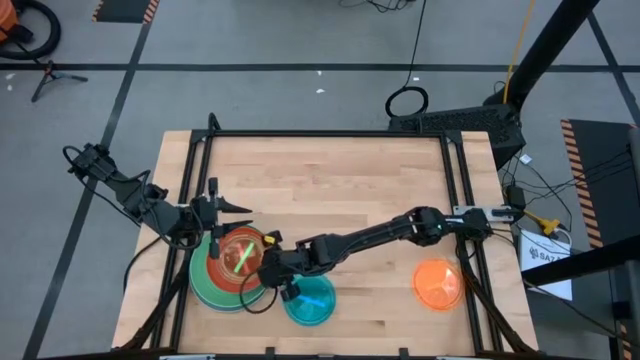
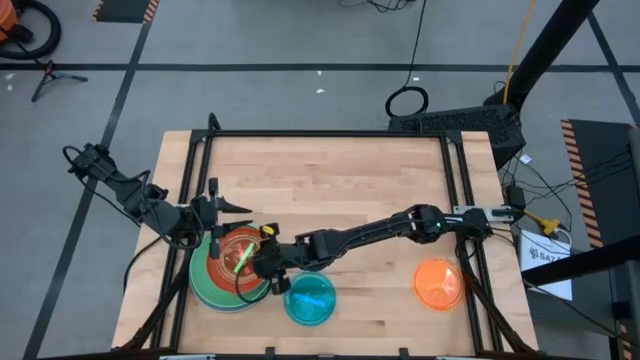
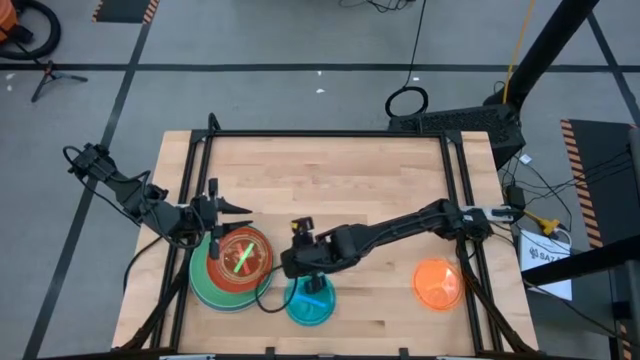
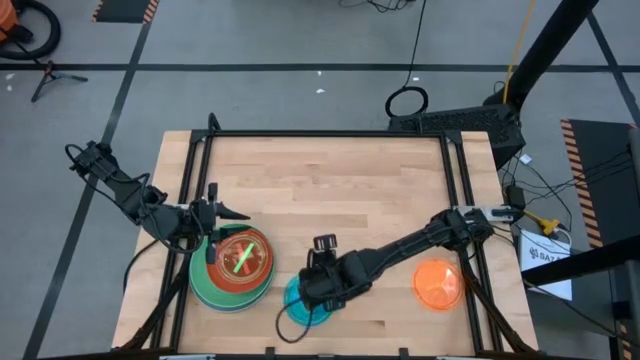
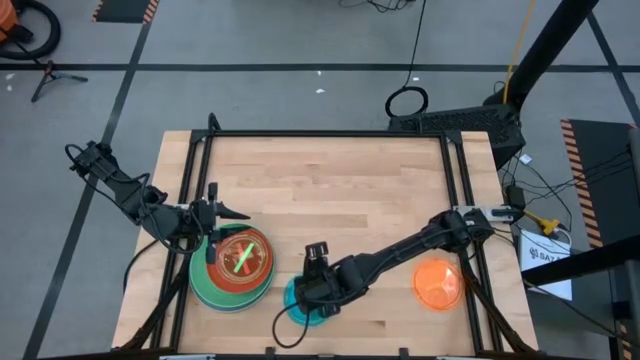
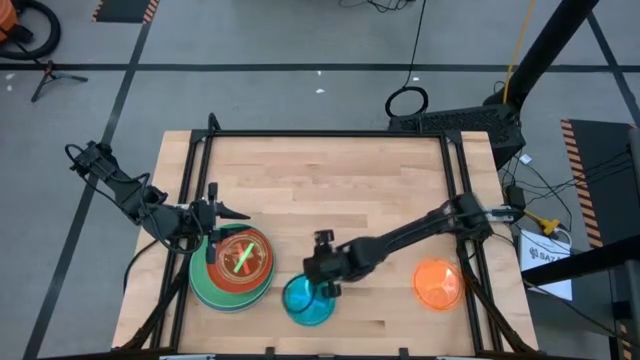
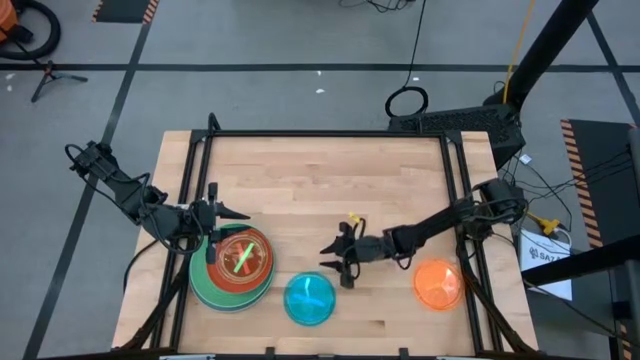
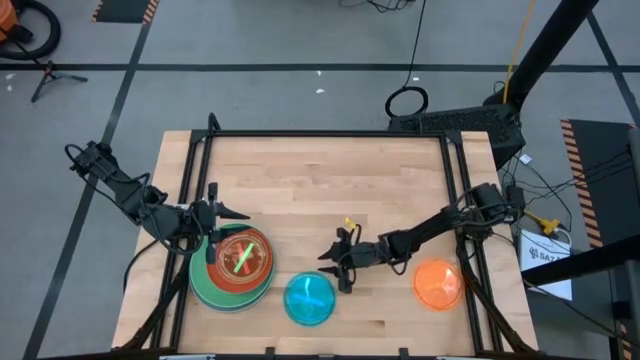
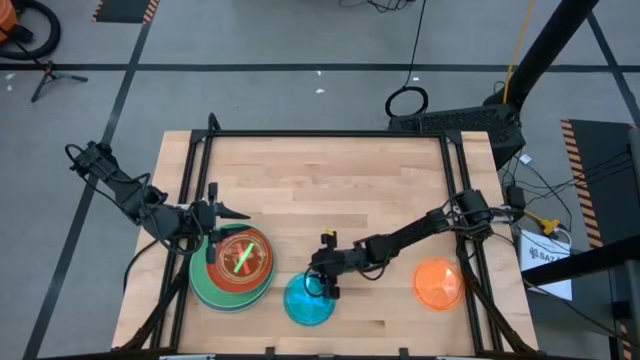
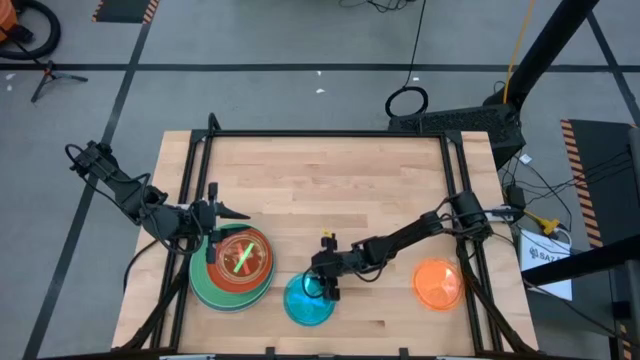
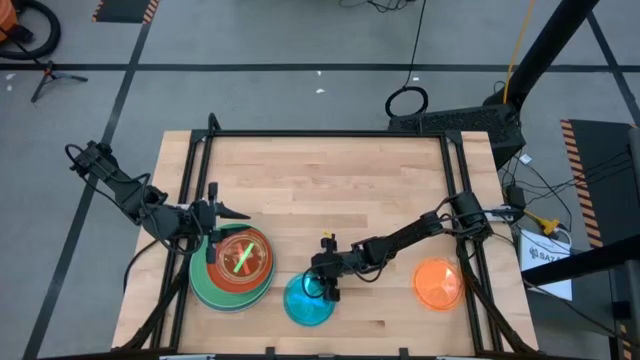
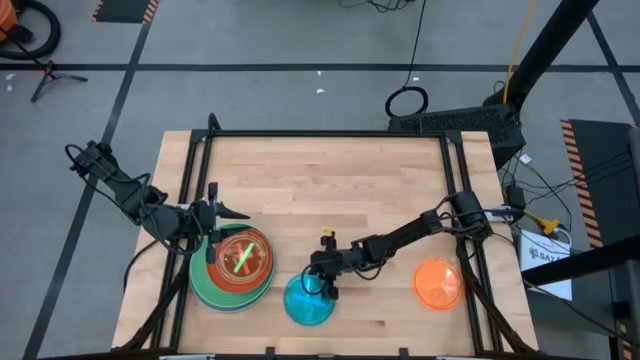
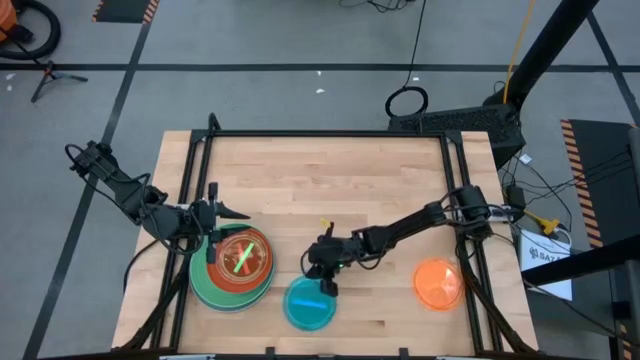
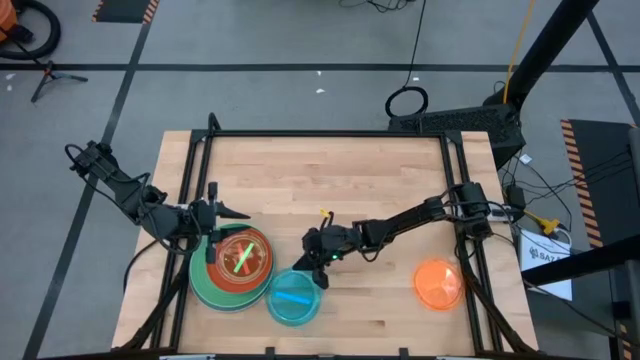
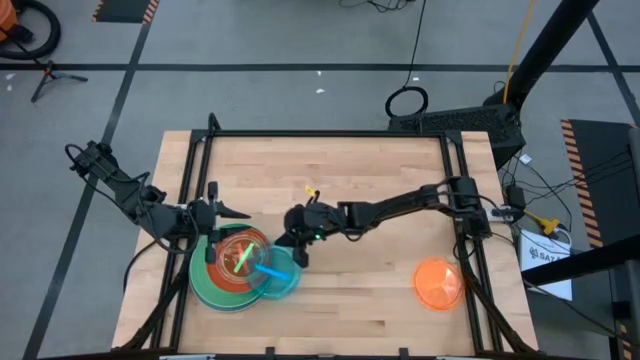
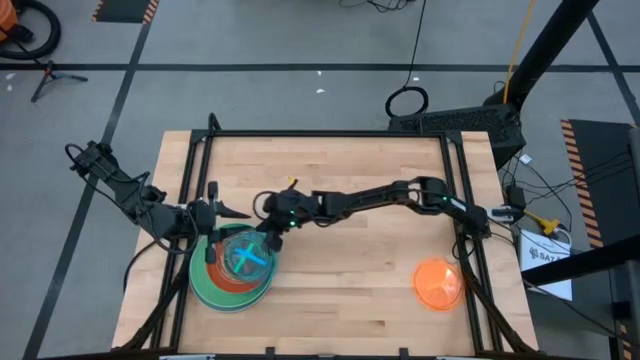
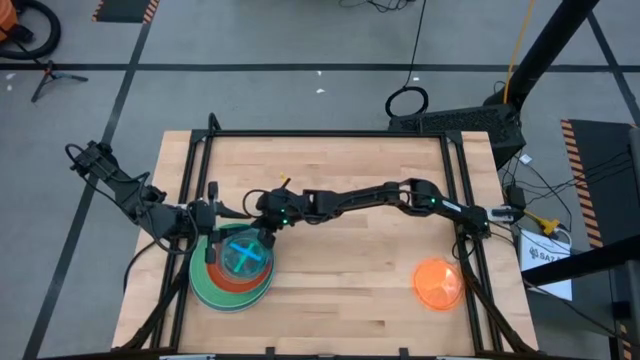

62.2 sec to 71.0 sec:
Task: Stack plastic plates
Stack the light blue plate on top of the light green plate

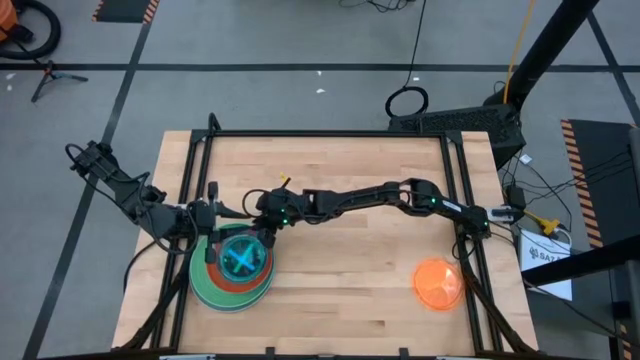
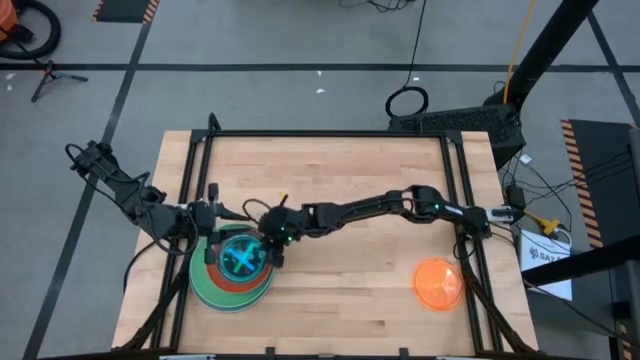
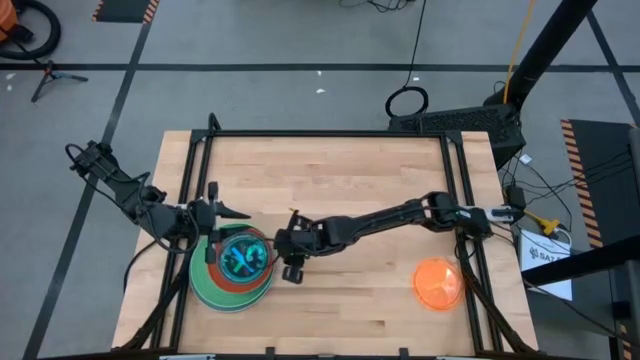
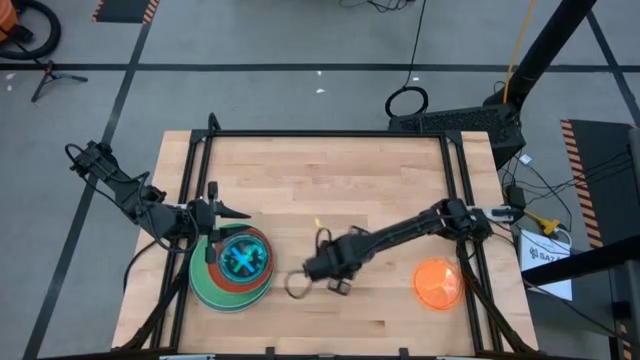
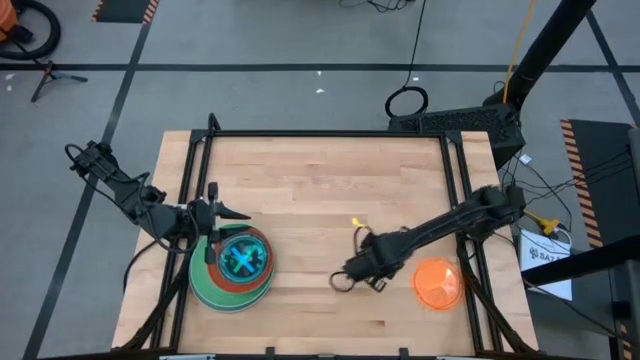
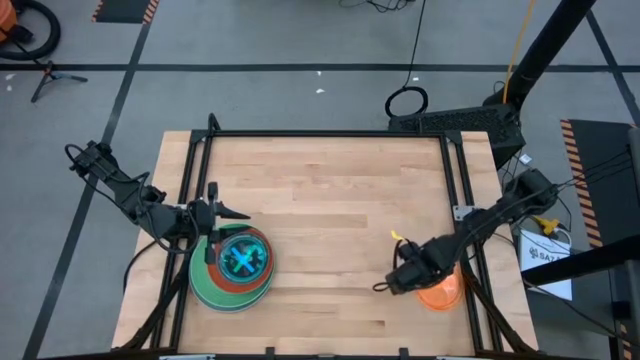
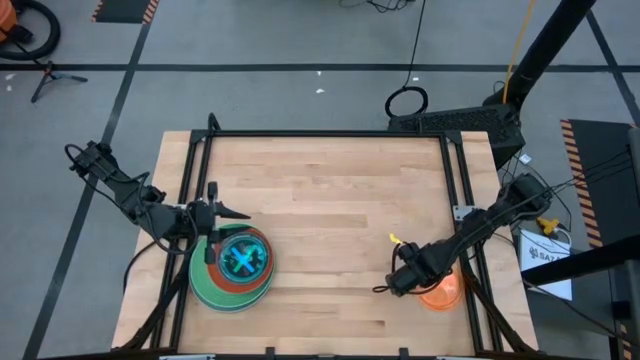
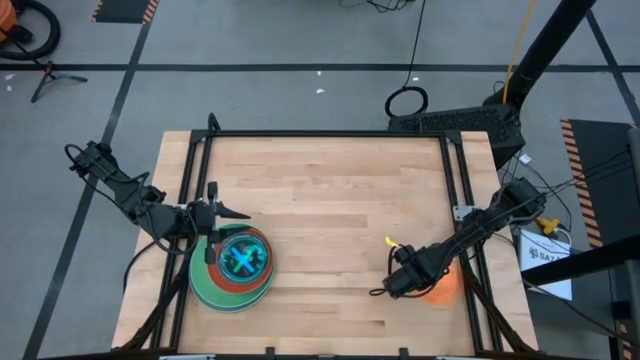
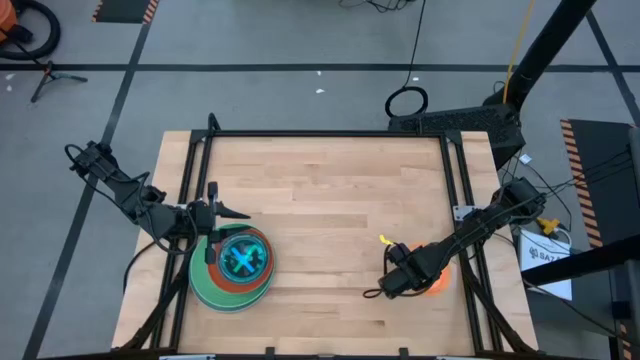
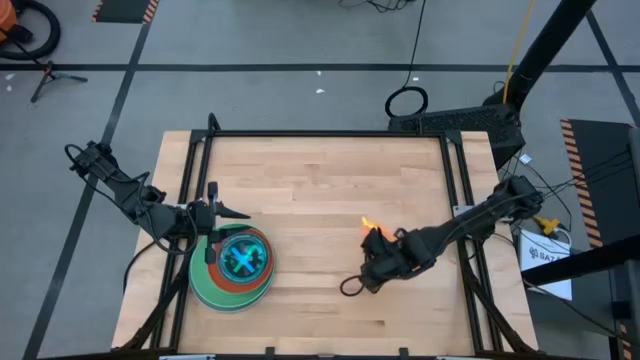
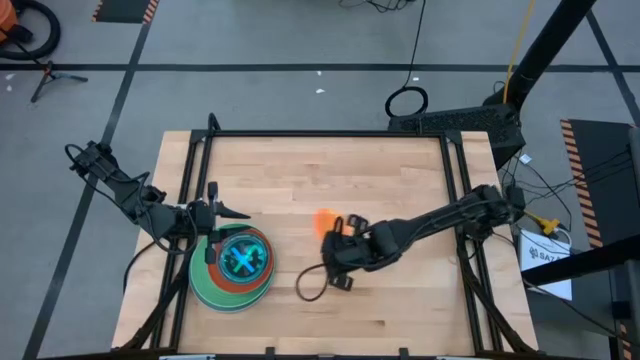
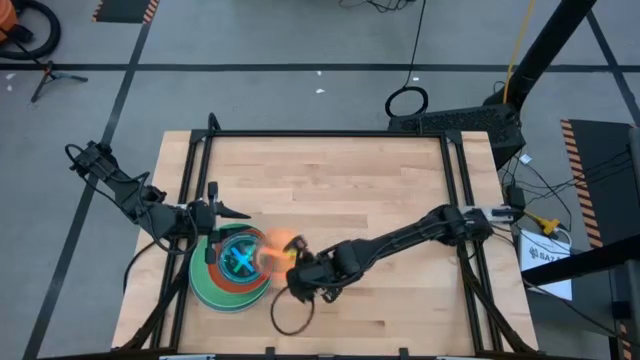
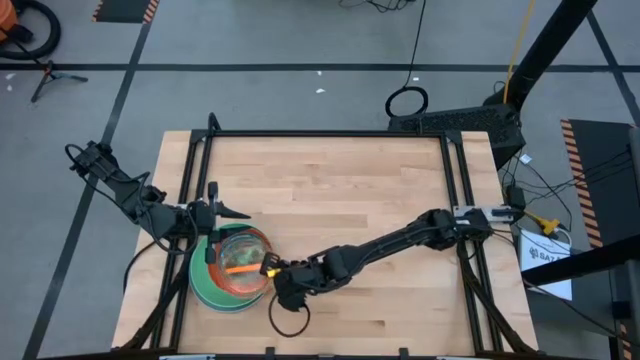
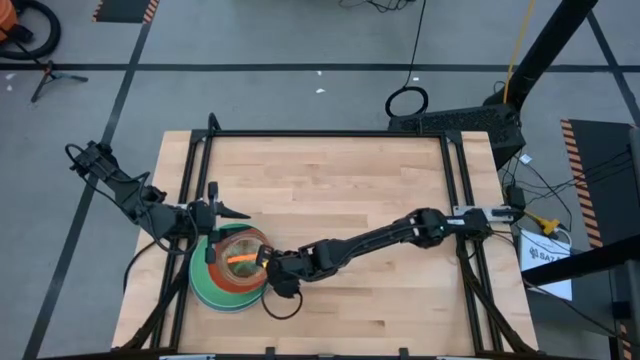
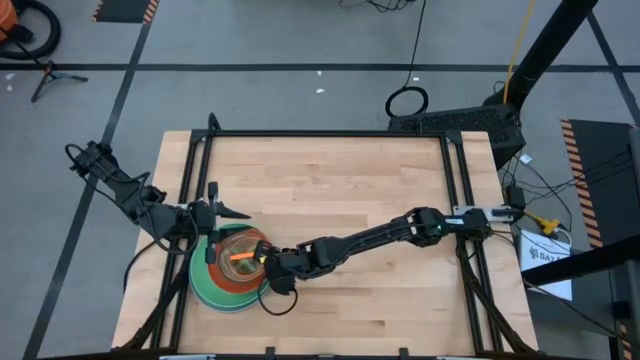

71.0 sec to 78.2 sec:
Stack the light orange plate on top of the light blue plate

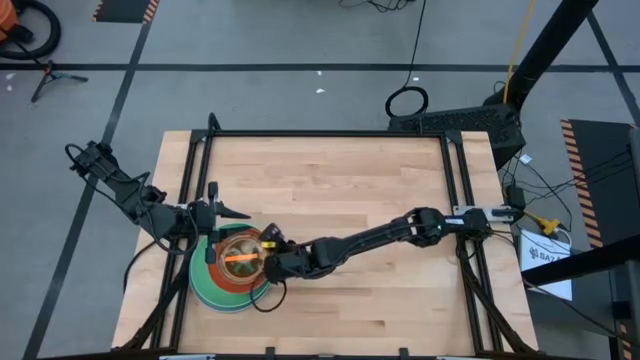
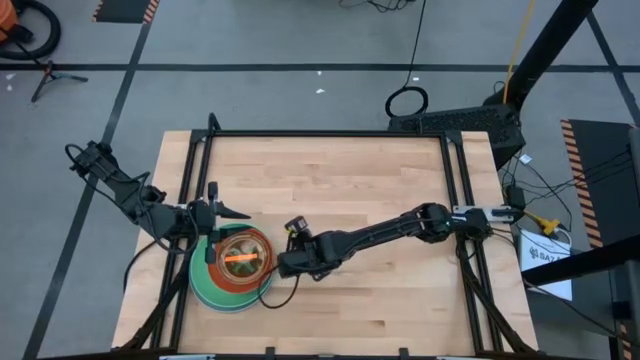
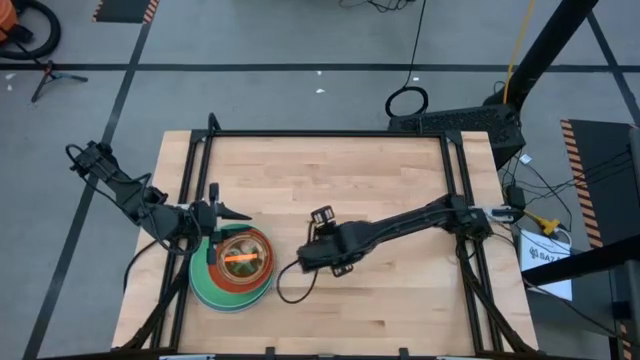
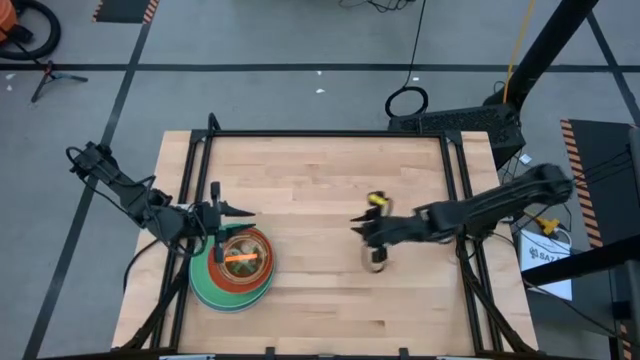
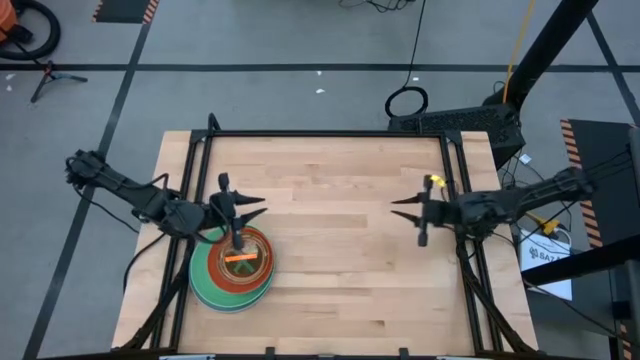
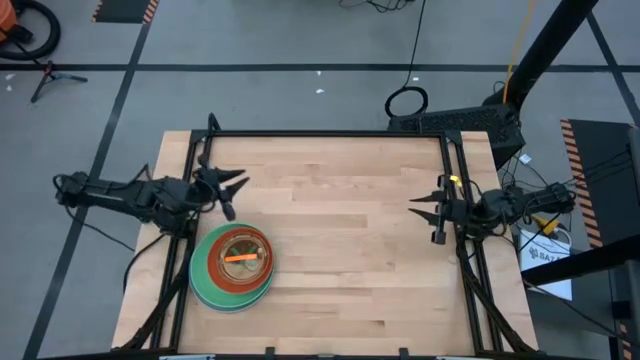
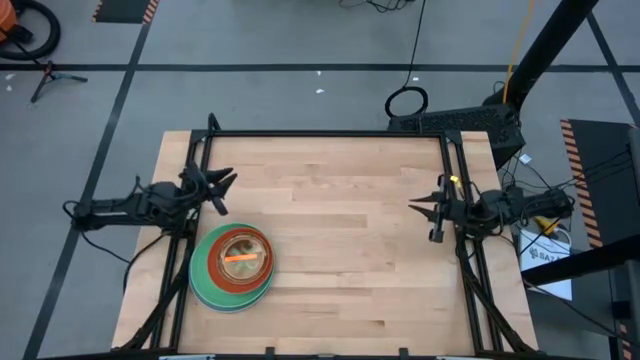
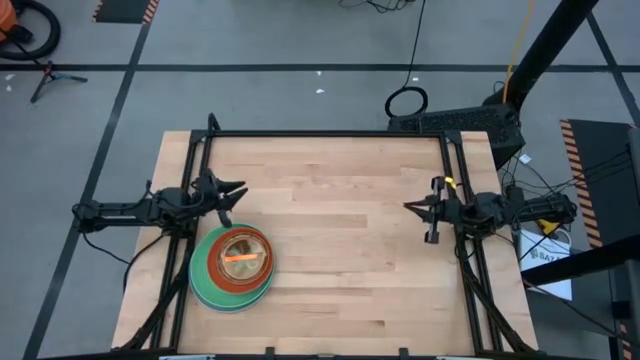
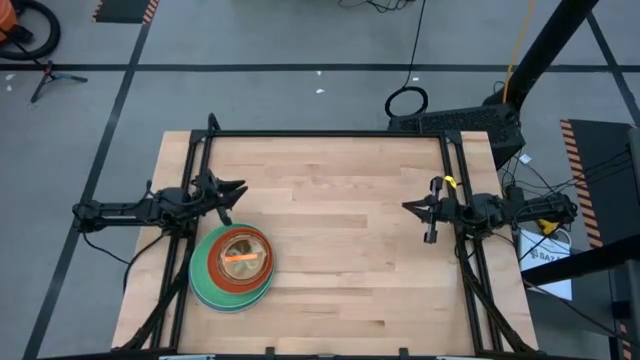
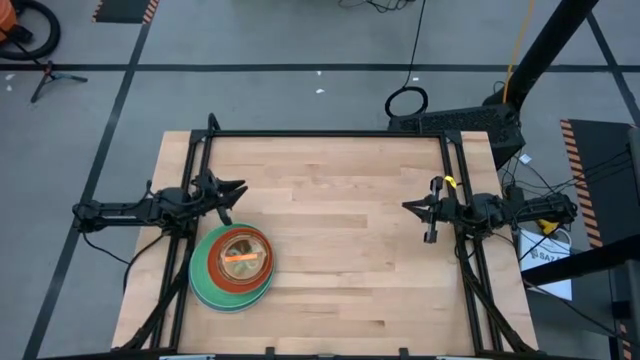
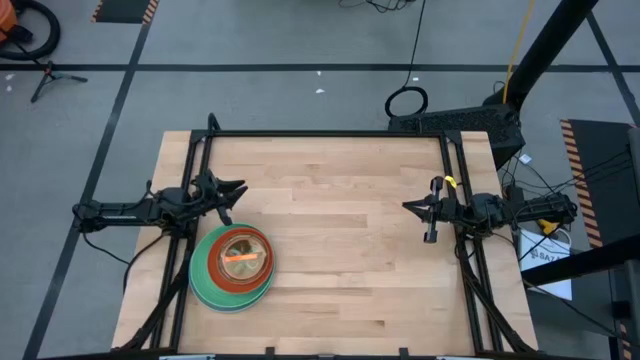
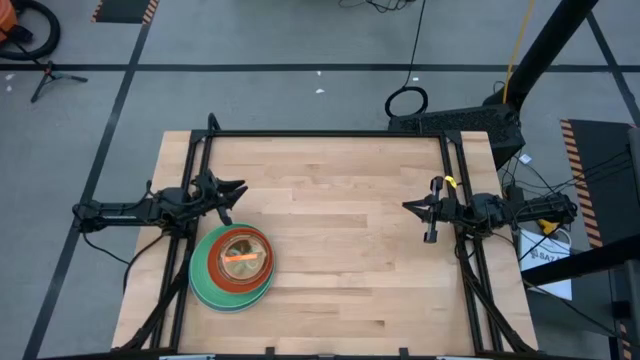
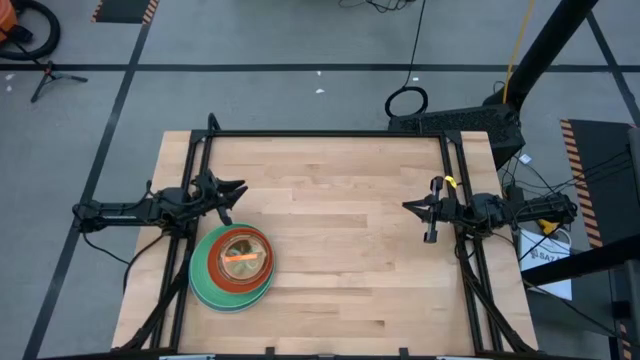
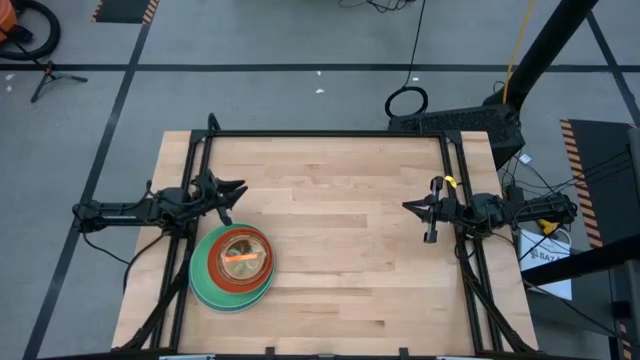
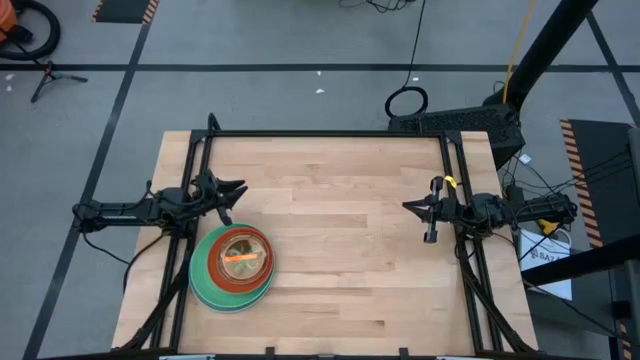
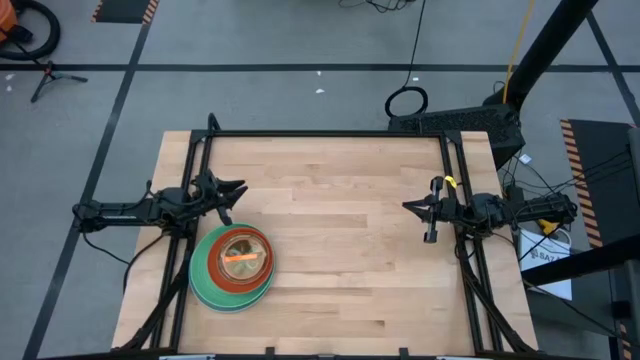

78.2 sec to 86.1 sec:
Return to Home Position
